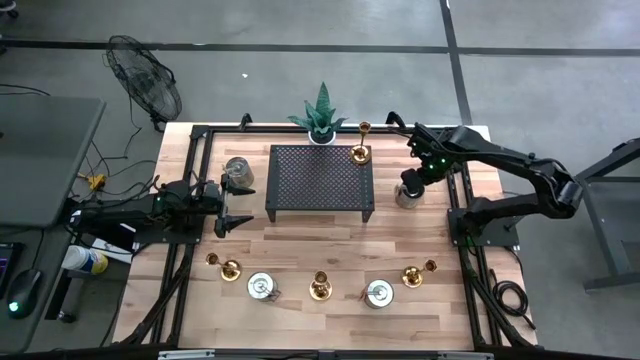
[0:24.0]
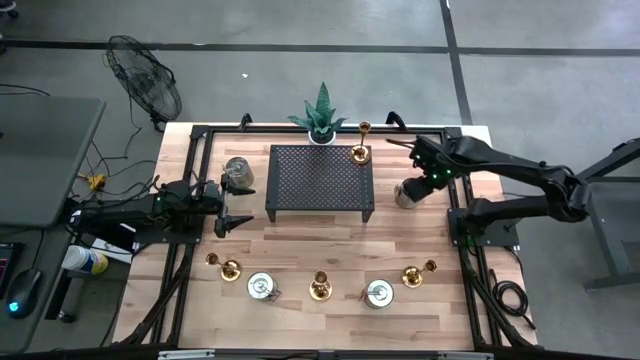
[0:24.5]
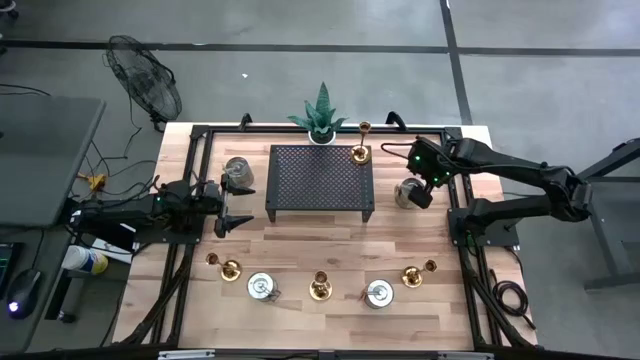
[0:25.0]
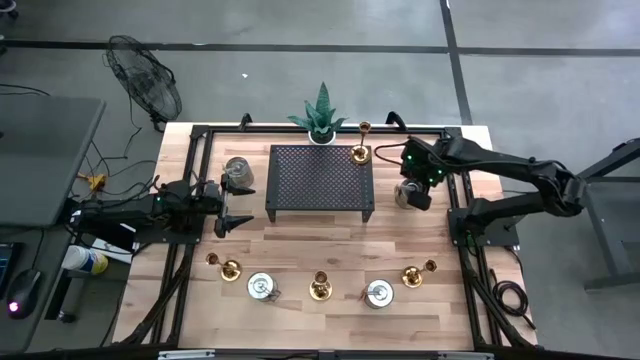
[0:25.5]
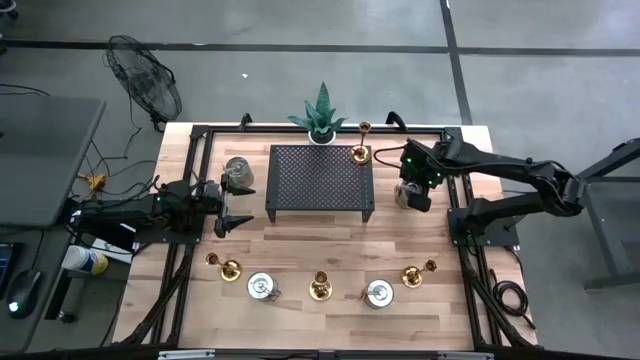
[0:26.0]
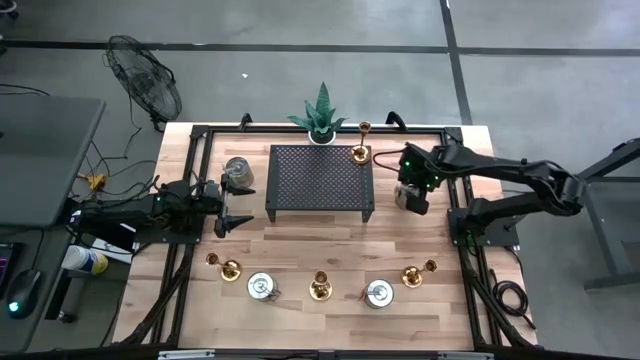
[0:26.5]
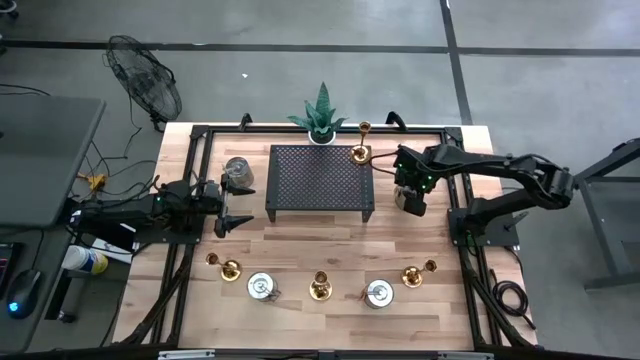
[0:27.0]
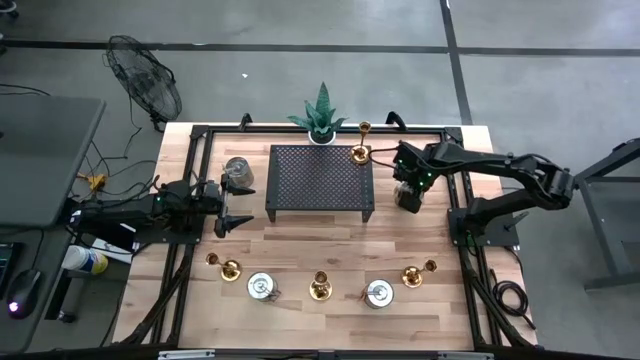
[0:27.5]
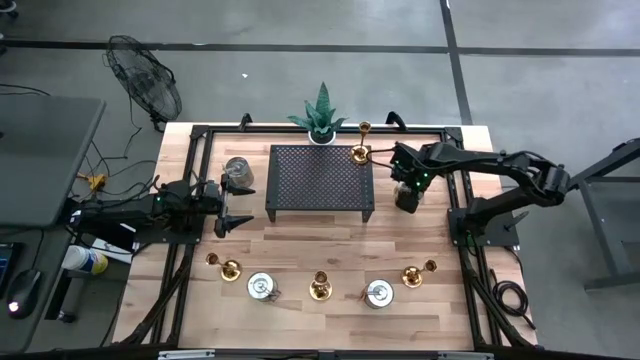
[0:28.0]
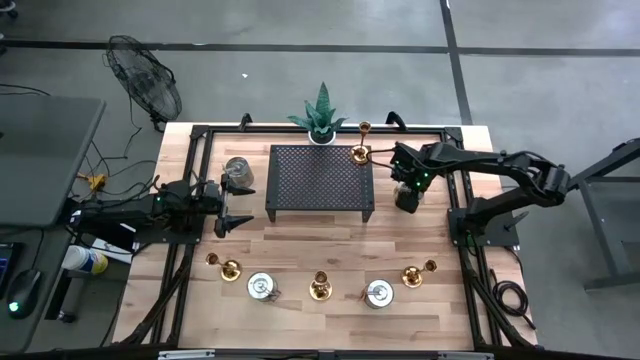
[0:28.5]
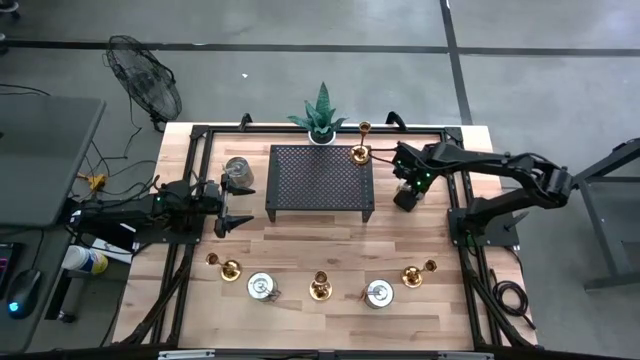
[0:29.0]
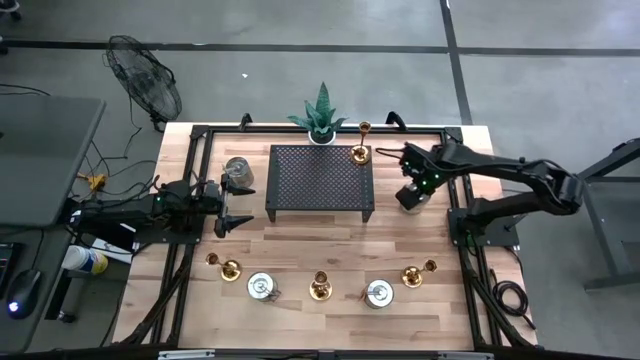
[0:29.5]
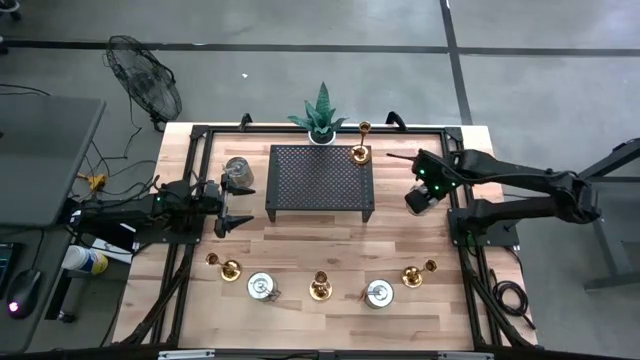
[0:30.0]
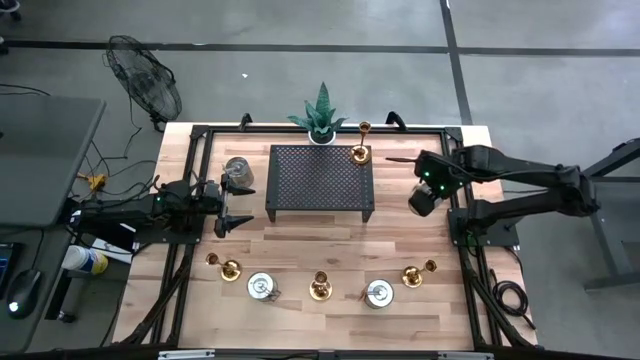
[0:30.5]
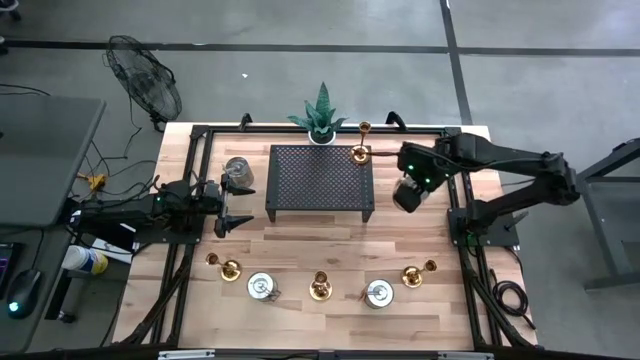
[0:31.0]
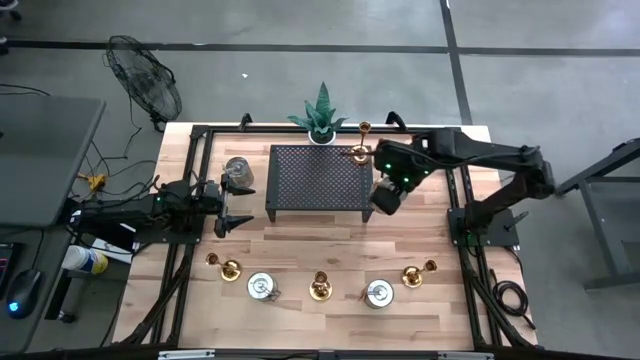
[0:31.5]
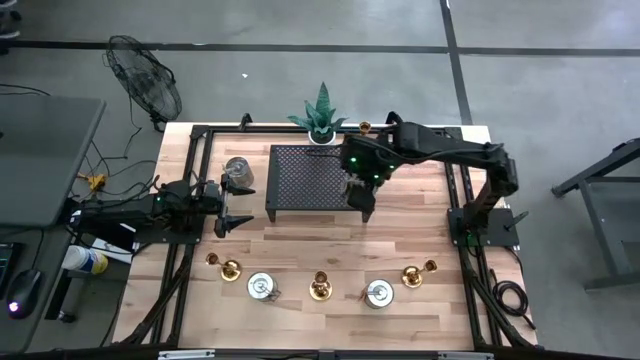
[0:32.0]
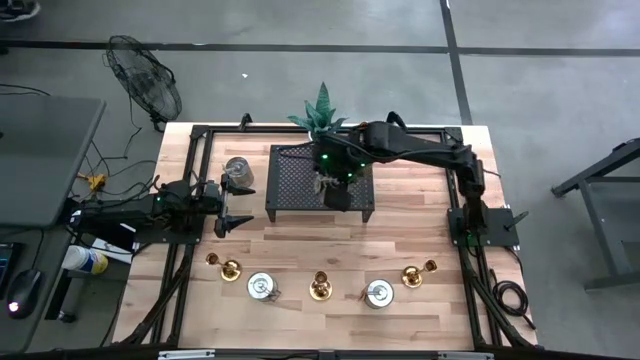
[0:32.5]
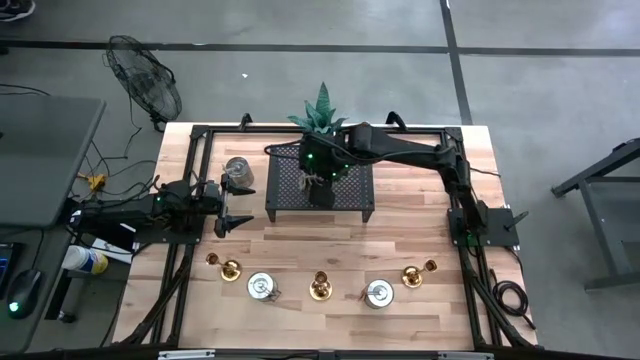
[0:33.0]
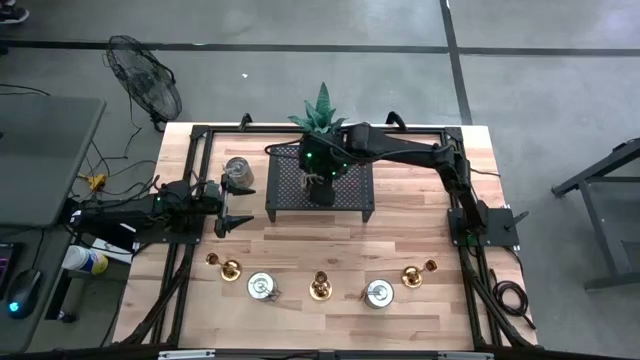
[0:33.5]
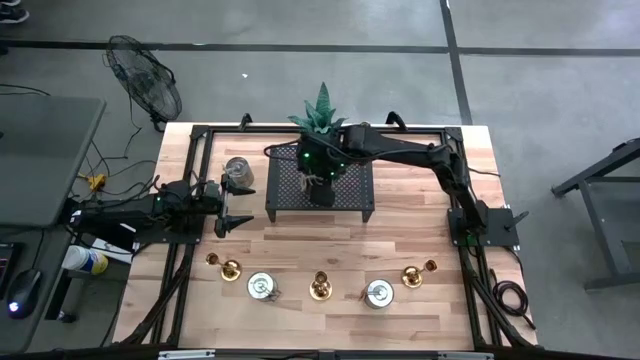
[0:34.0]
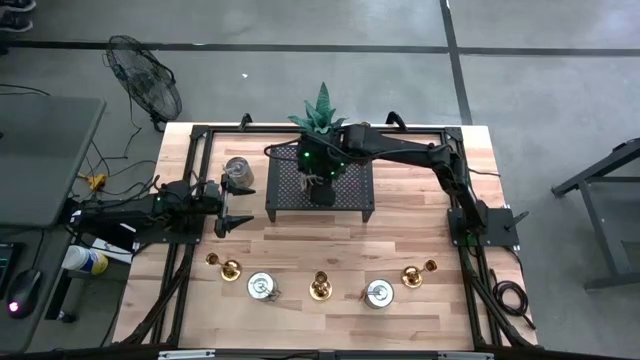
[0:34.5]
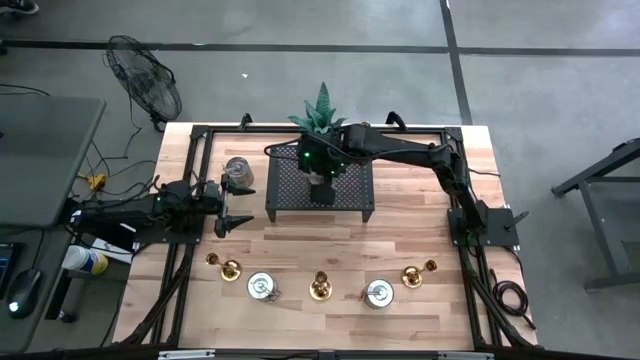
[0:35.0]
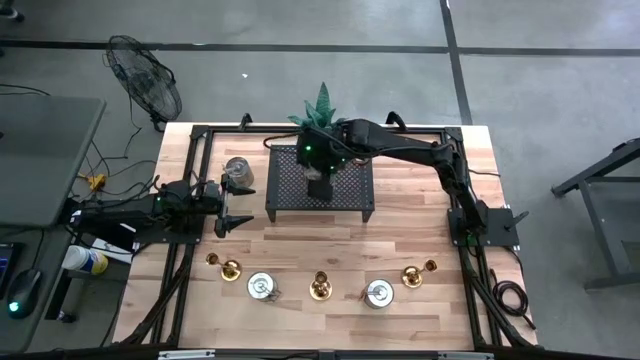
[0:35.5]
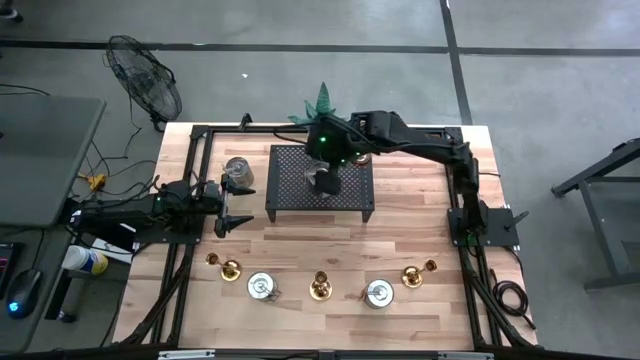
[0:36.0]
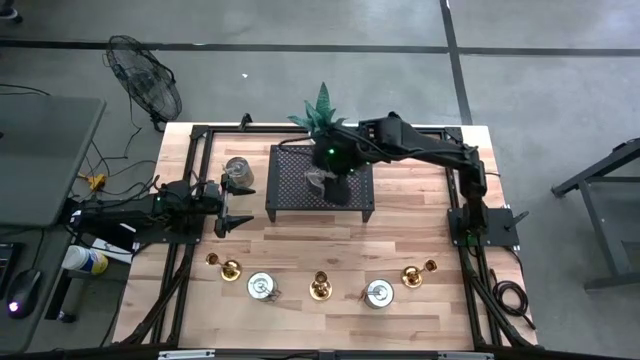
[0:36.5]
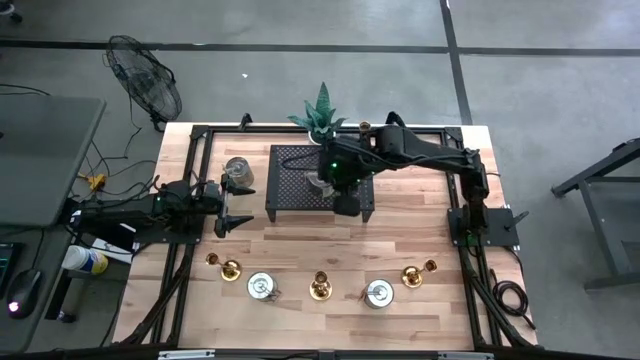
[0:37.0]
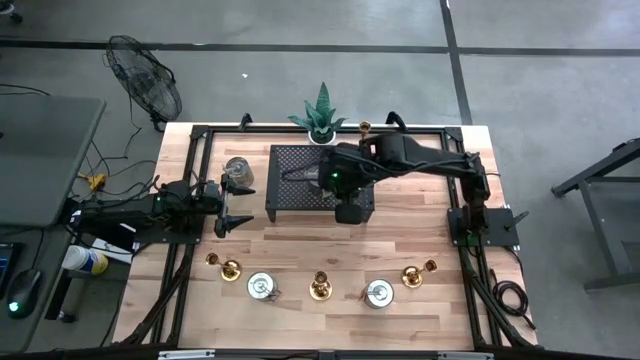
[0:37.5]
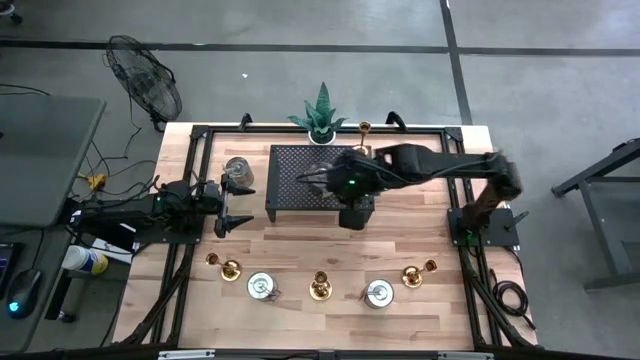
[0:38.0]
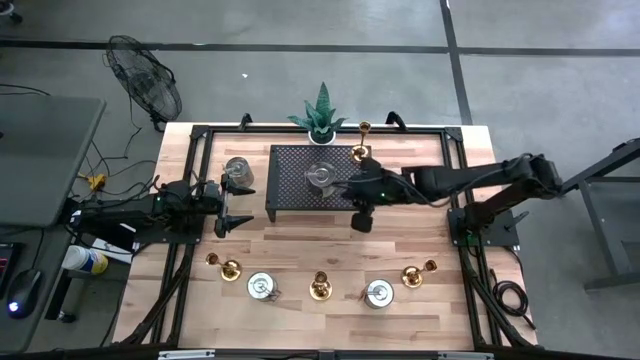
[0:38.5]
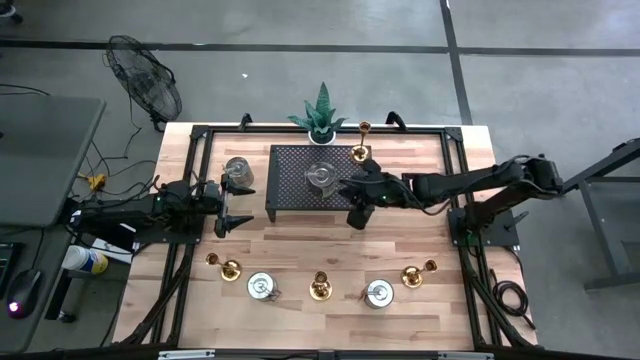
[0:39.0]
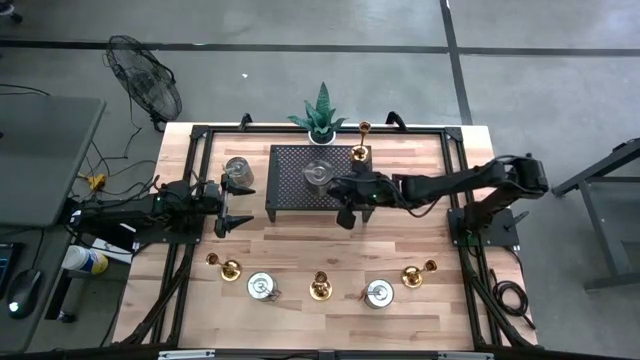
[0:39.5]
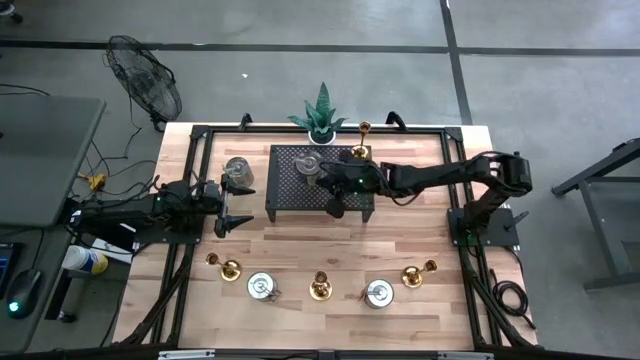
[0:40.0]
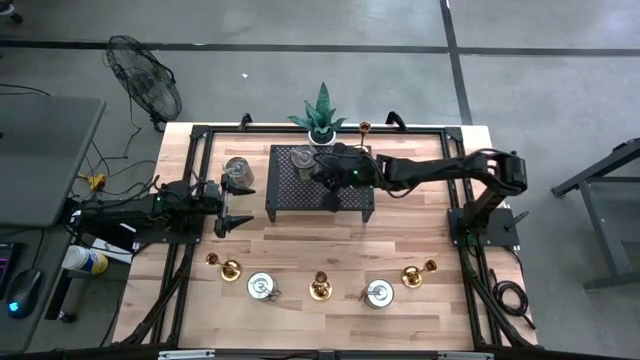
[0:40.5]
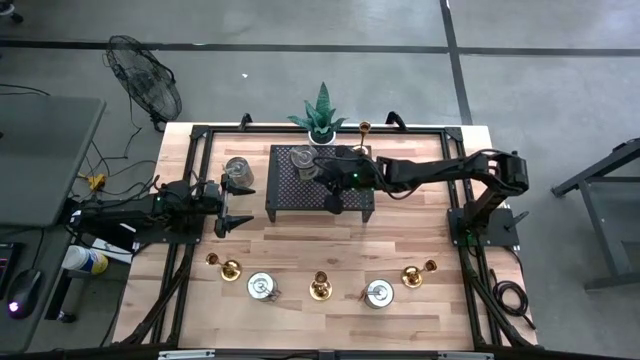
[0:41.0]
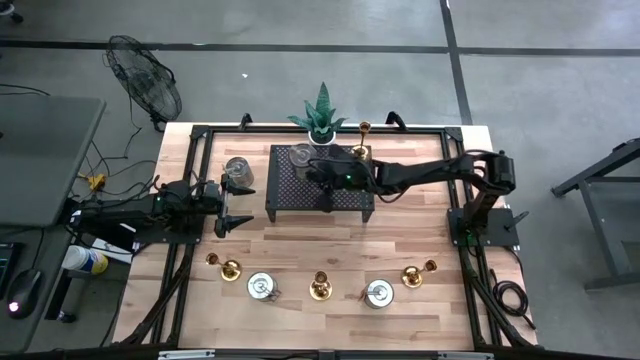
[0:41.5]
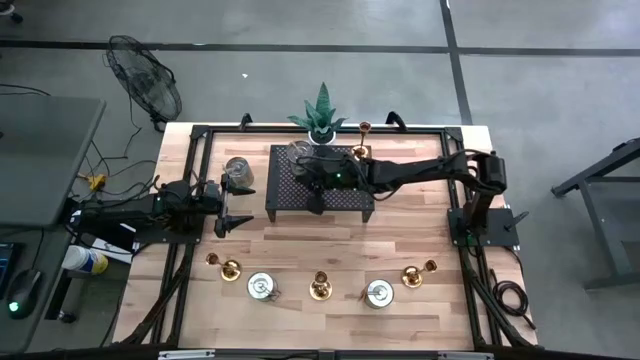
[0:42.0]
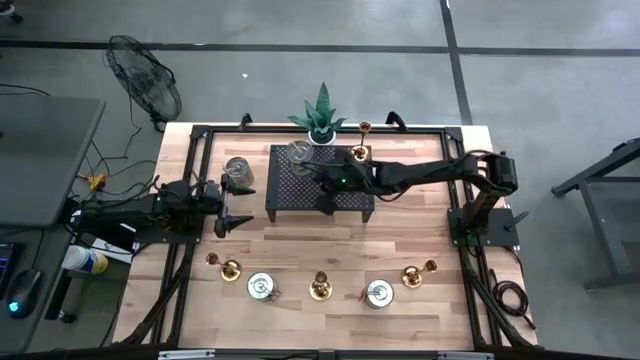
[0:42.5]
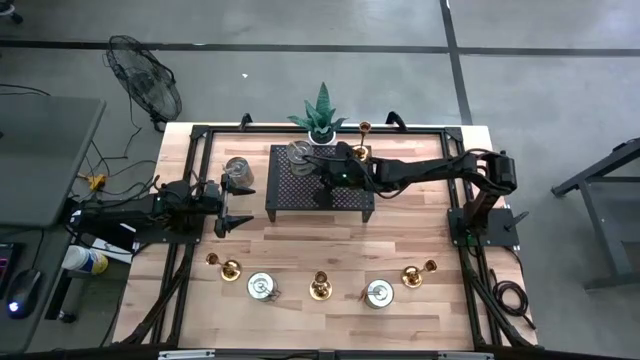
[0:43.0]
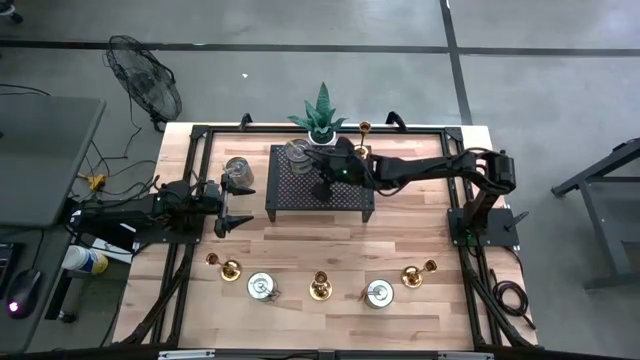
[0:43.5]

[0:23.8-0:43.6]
Task: Pick & Place candle stick holders
Put the silver scented candle on the shelf
